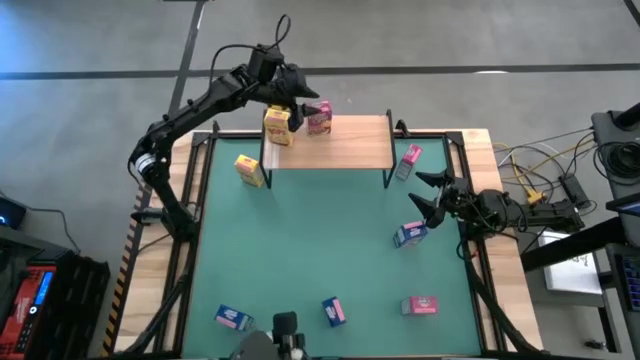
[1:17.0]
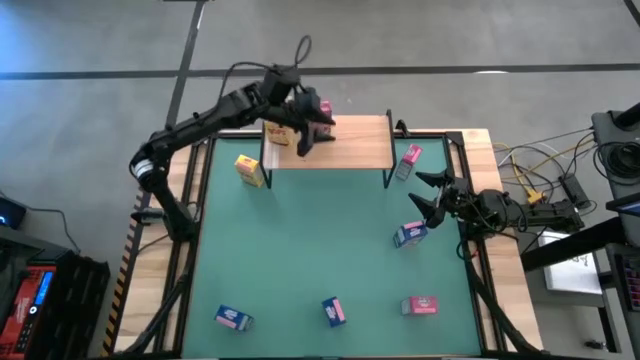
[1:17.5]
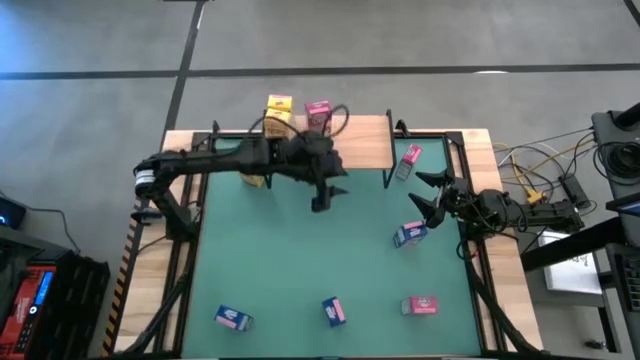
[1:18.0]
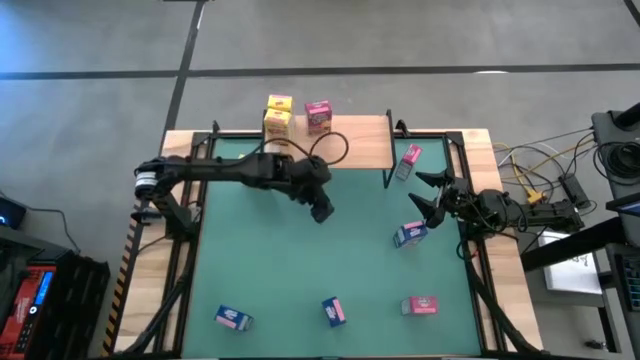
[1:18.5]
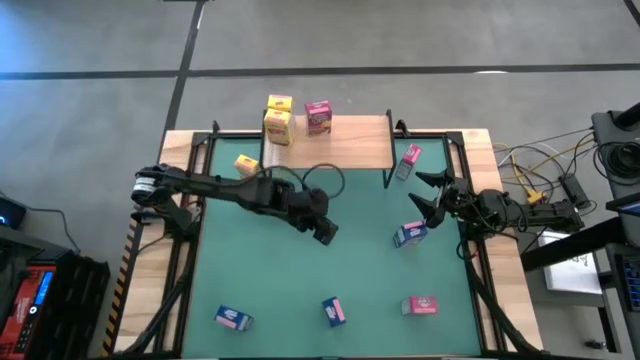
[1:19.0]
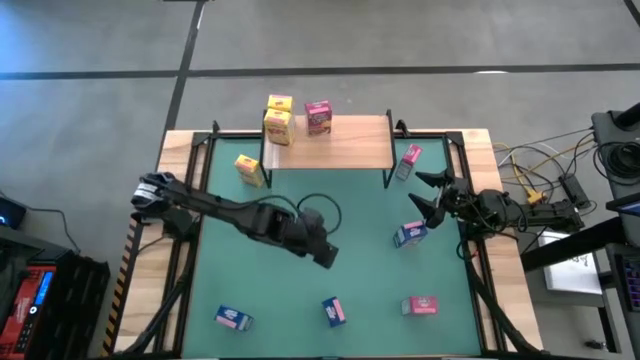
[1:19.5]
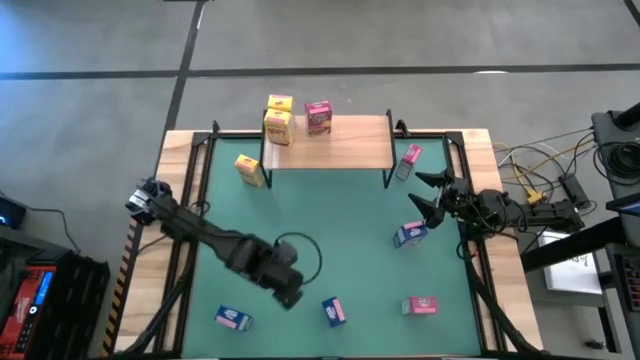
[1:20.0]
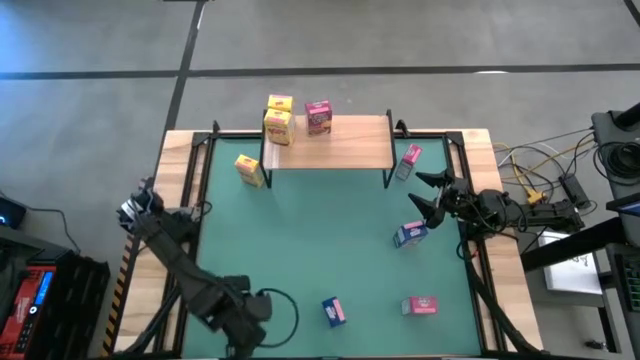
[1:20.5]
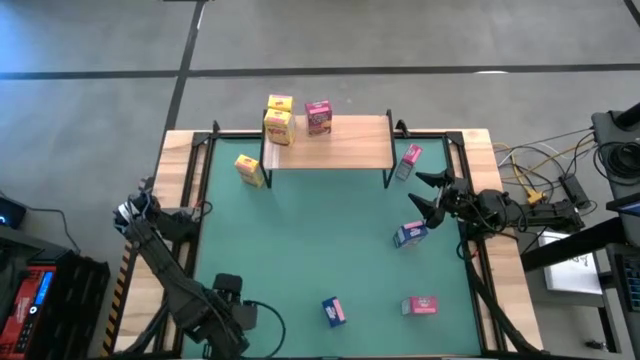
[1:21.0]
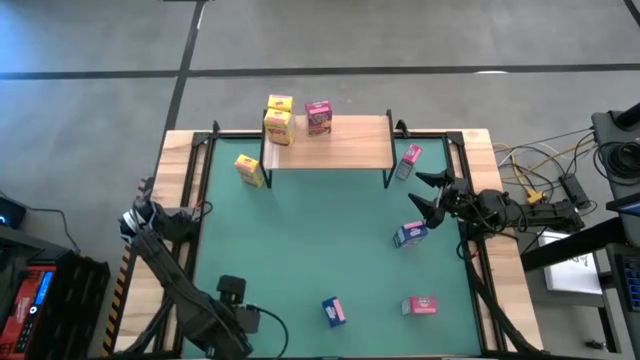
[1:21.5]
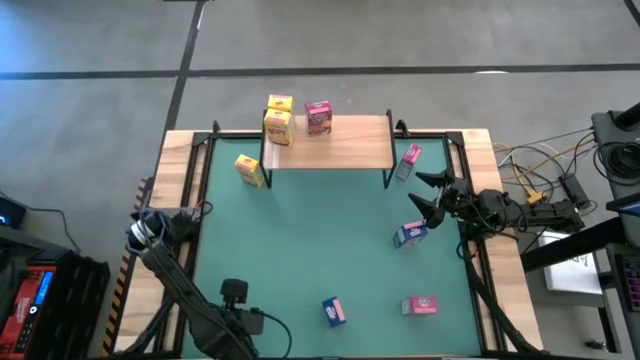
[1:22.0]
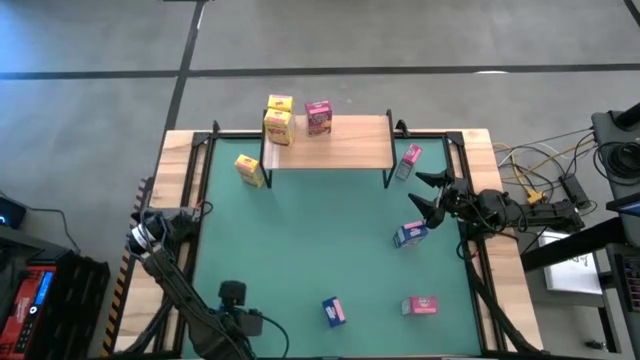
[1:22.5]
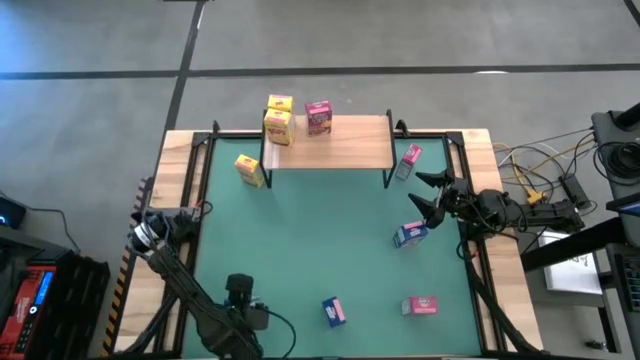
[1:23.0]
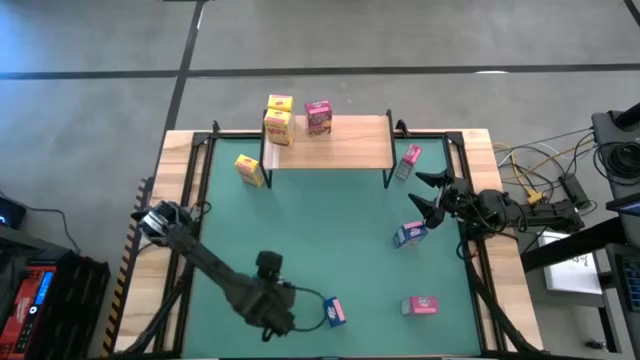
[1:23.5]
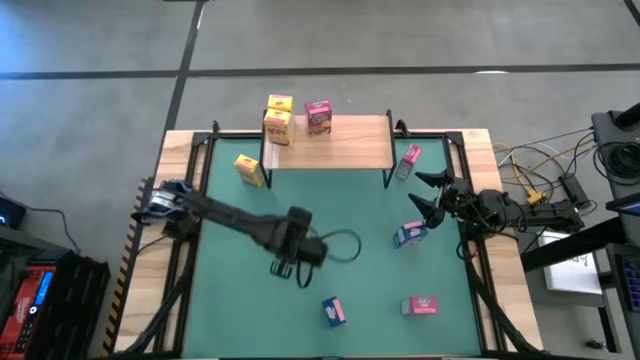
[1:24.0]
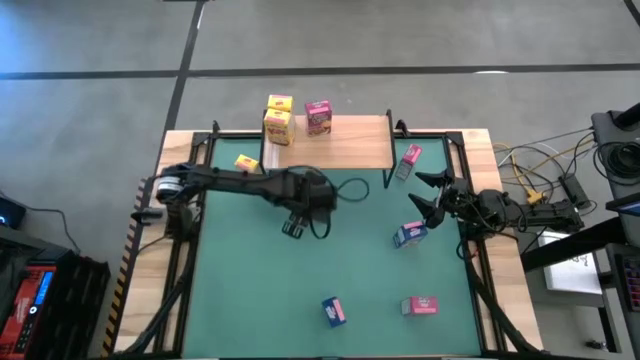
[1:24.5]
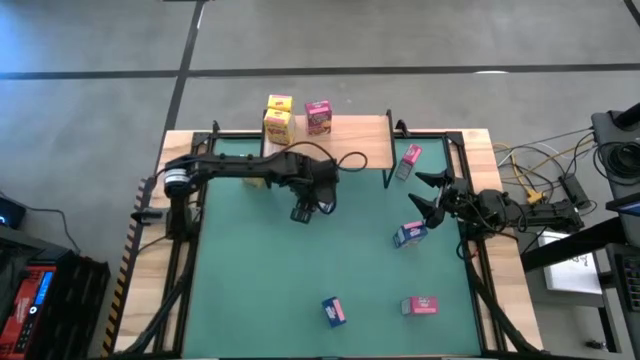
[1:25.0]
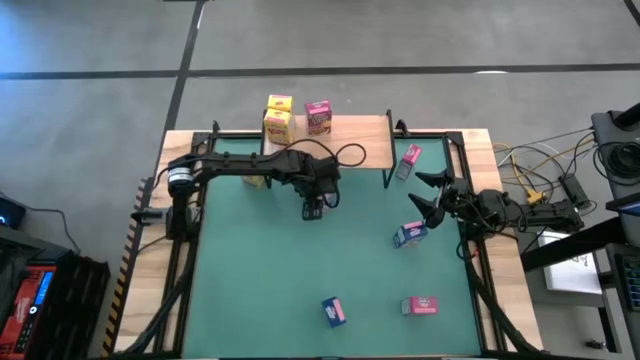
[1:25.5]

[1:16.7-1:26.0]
Task: Stack cereal on shelf
Move the left blue cereal box on the table

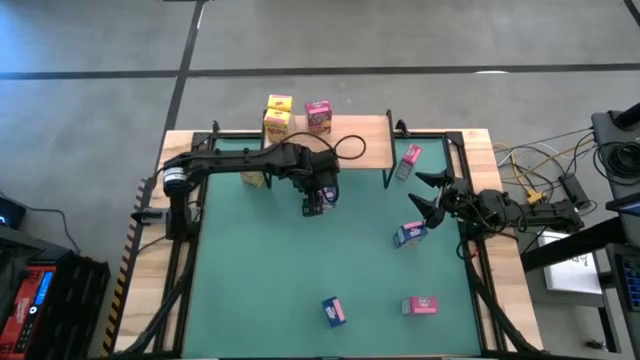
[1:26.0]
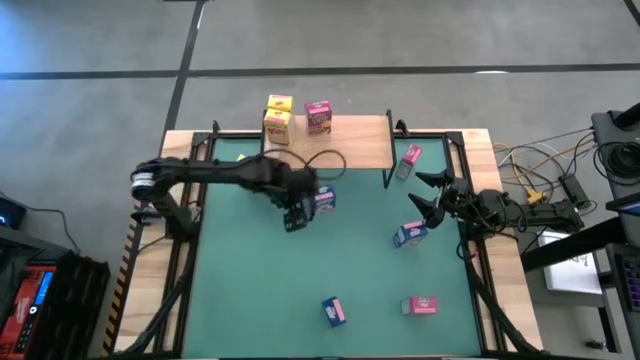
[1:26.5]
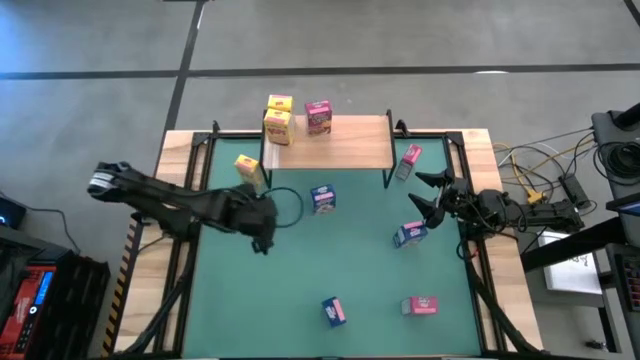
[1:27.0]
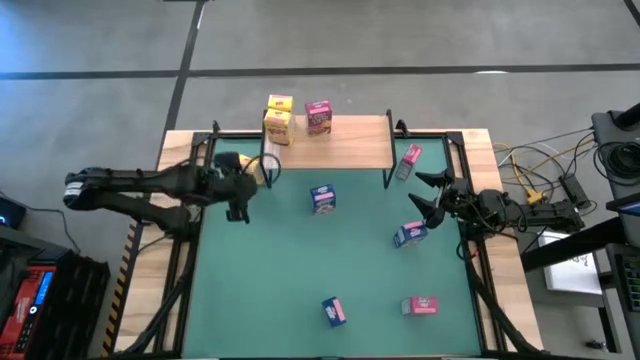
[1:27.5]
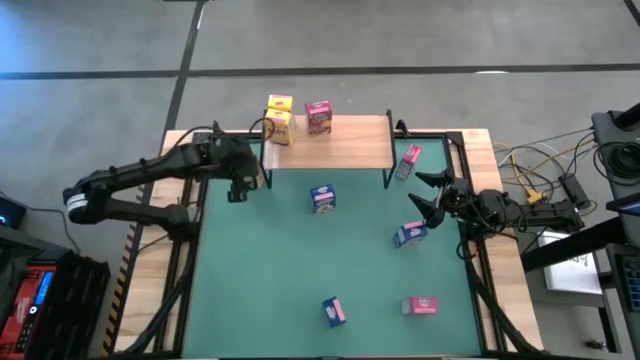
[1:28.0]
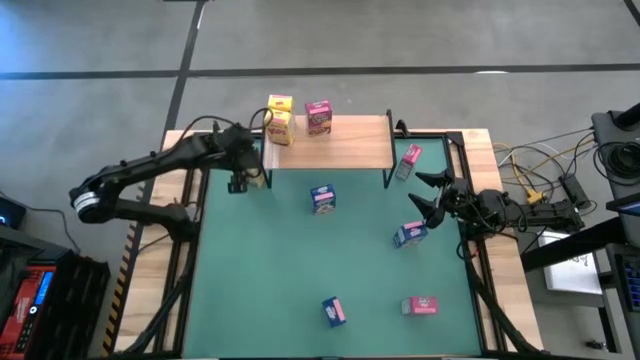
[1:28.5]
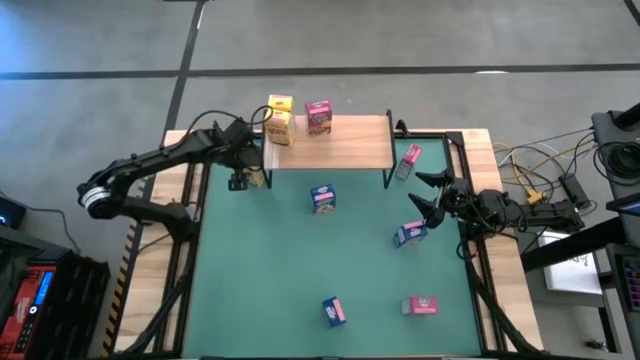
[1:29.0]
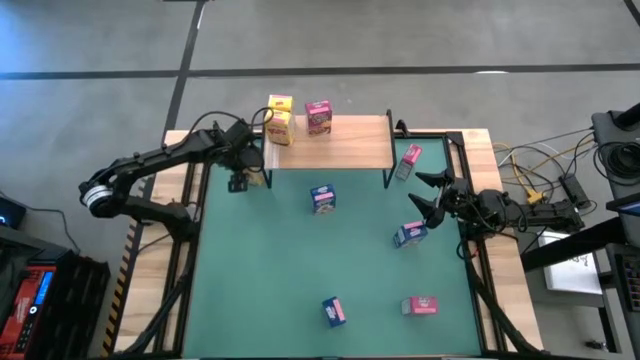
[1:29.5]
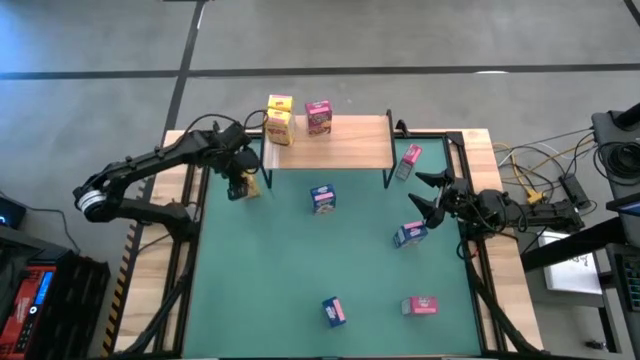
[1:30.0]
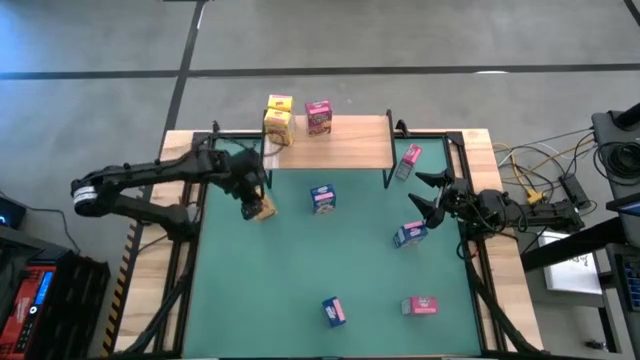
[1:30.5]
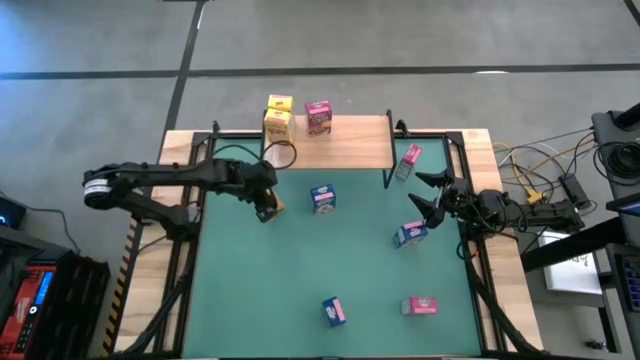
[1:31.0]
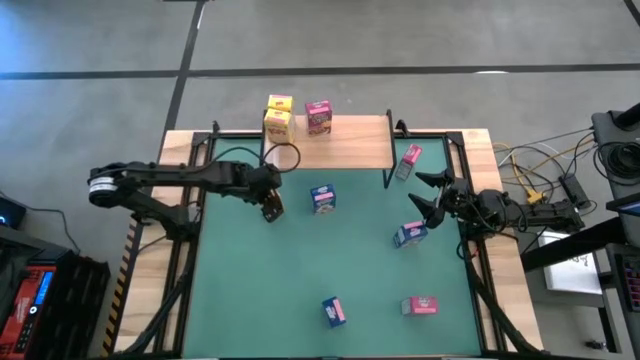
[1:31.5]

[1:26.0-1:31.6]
Move the yellow cereal box on the table

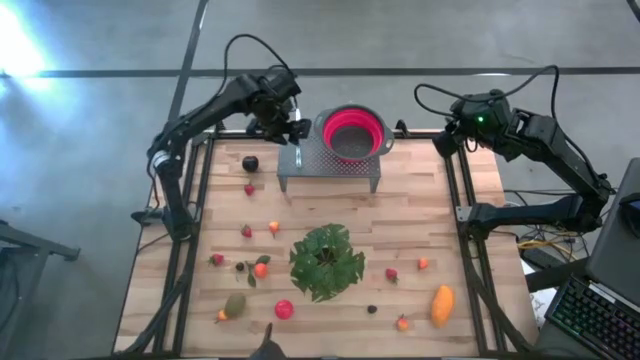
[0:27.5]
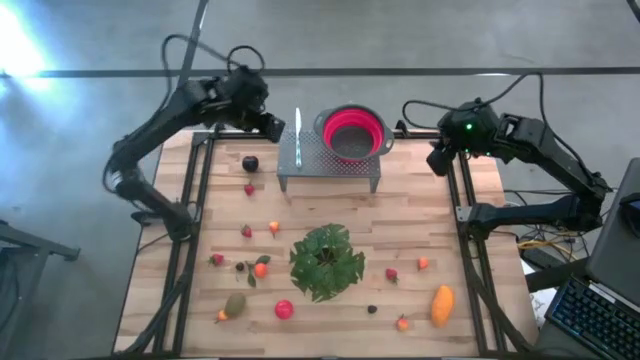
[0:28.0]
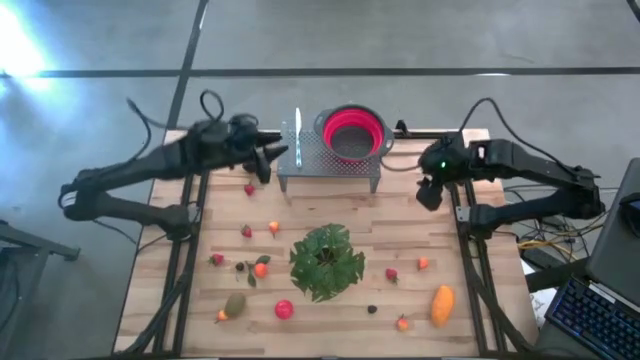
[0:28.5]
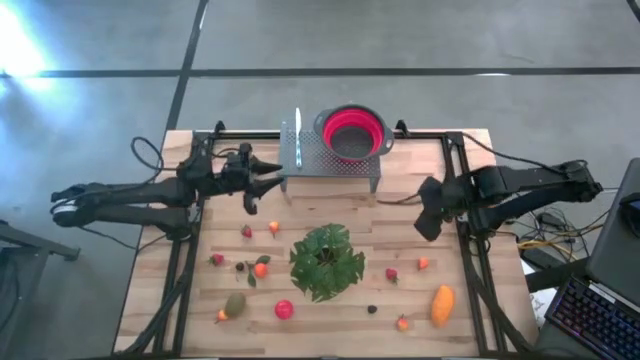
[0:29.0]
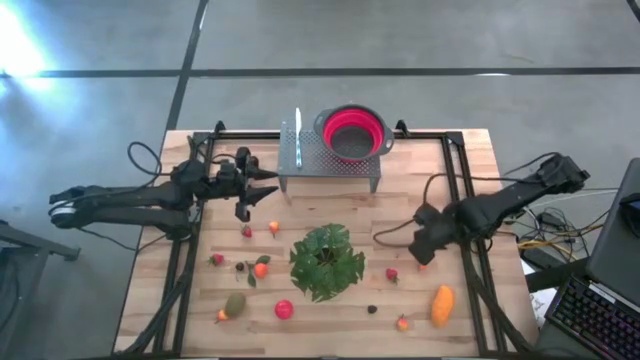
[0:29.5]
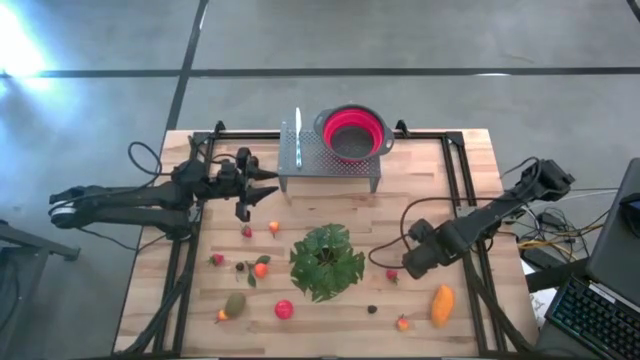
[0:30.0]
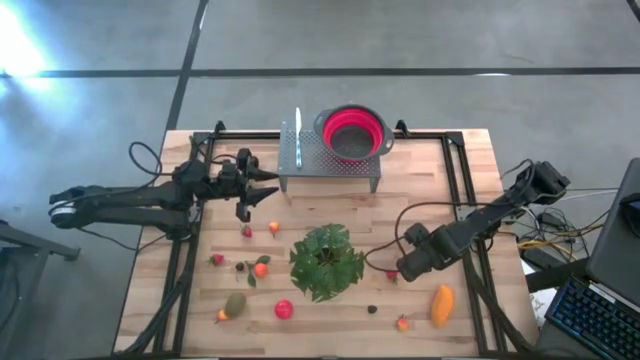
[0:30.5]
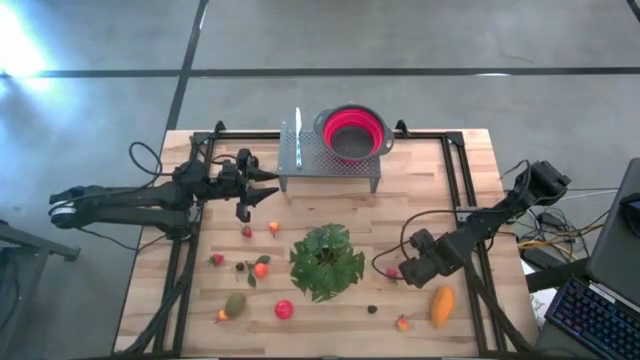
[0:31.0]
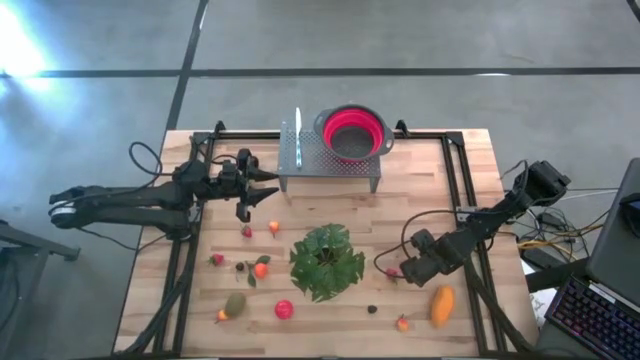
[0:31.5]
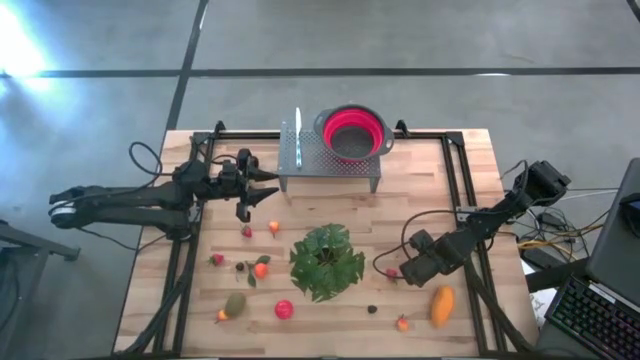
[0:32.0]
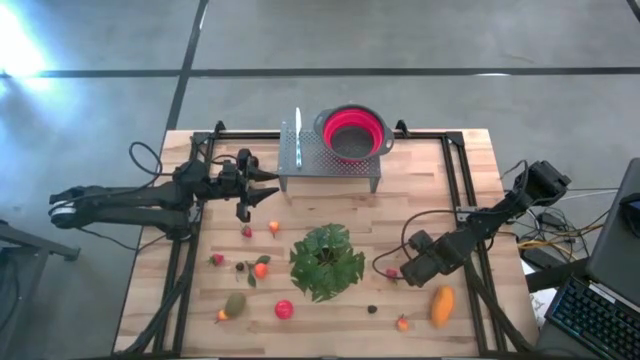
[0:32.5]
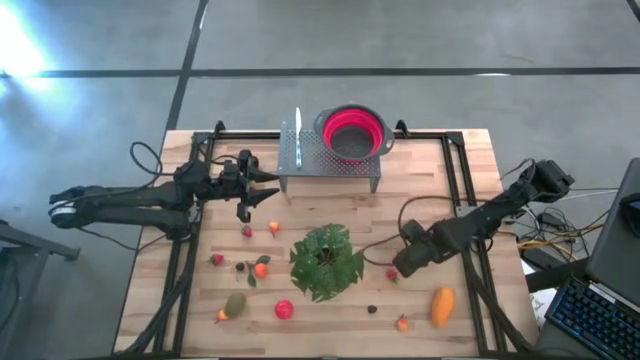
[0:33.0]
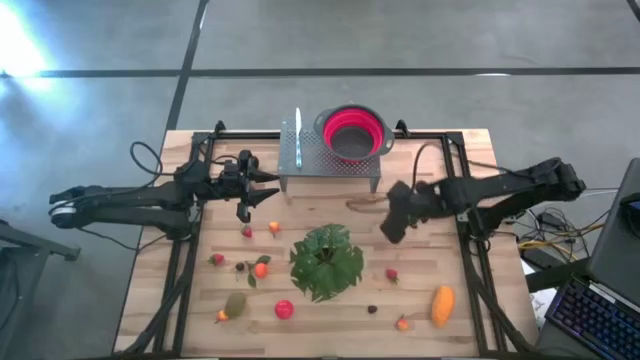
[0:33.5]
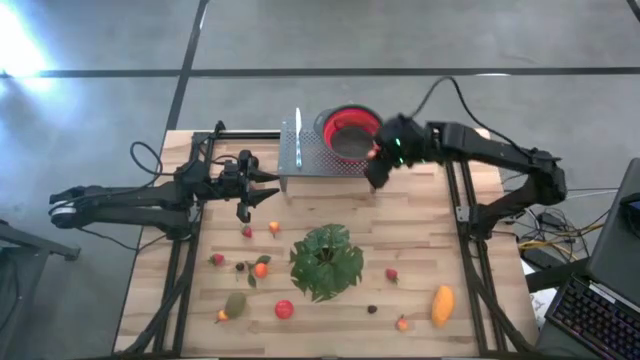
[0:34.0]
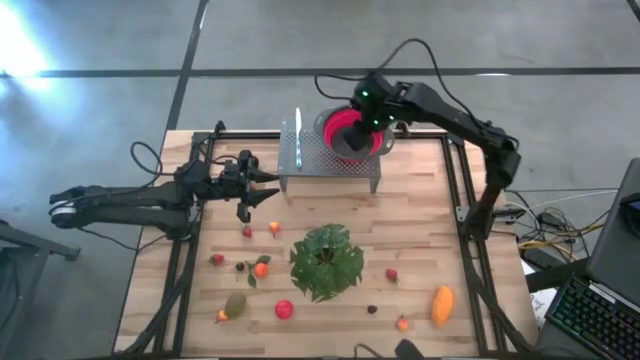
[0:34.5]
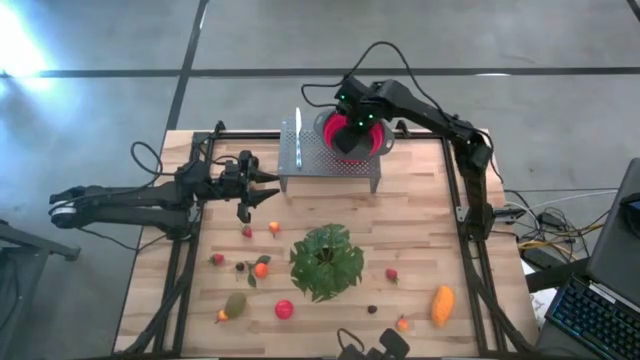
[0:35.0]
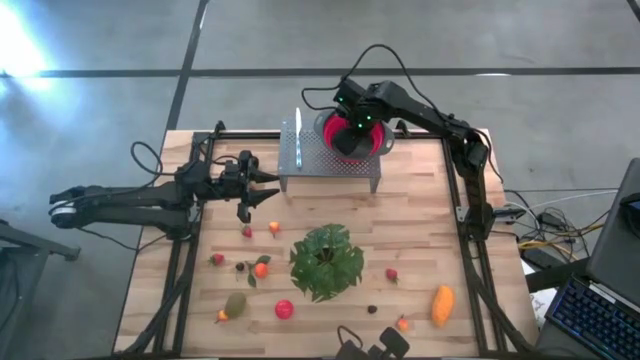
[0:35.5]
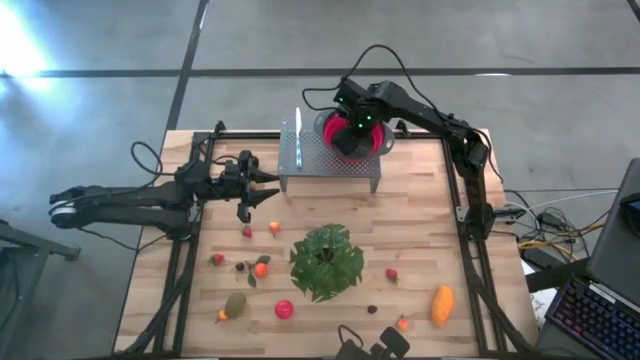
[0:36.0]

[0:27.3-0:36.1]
Task: Pick & Place Fruit
Put the orange pear into the red strainer bowl on the shelf
